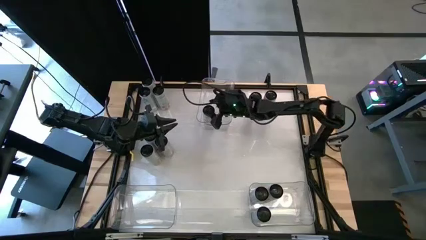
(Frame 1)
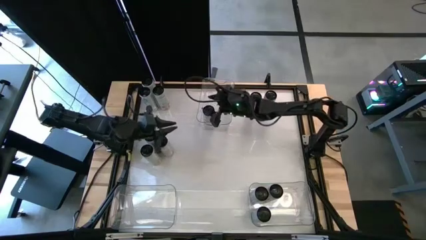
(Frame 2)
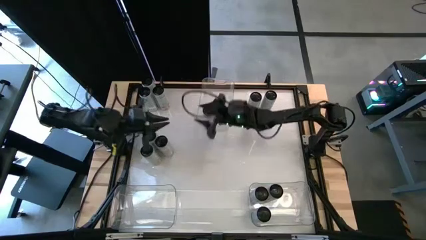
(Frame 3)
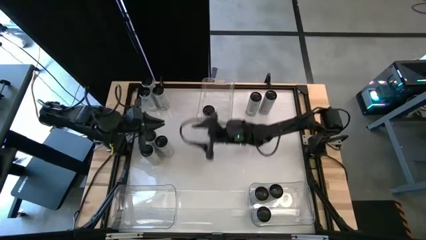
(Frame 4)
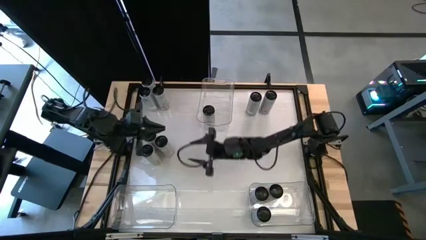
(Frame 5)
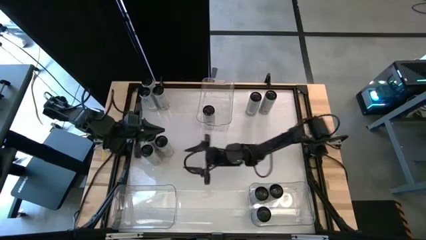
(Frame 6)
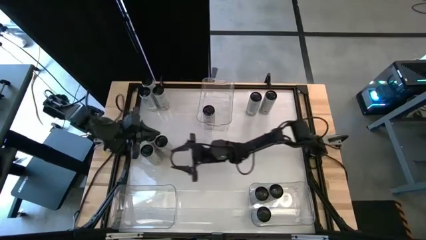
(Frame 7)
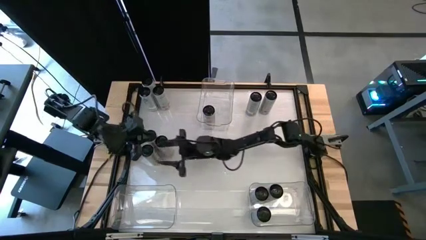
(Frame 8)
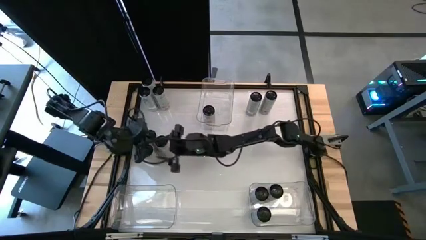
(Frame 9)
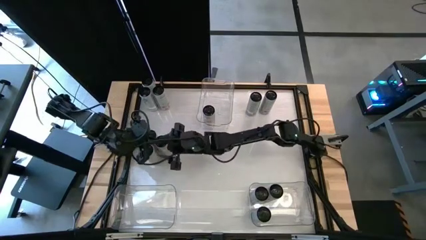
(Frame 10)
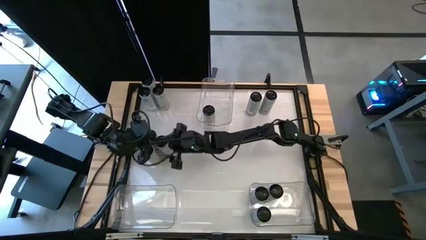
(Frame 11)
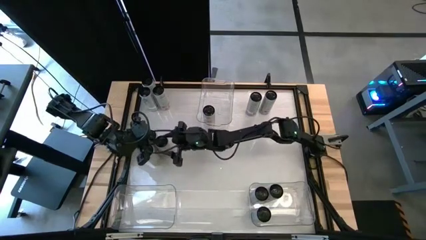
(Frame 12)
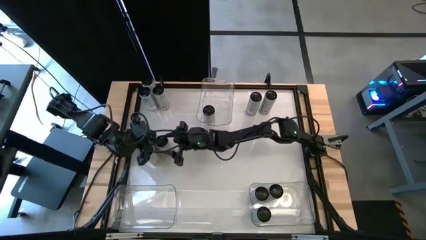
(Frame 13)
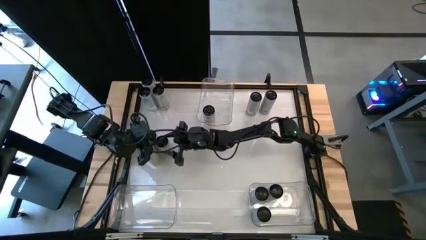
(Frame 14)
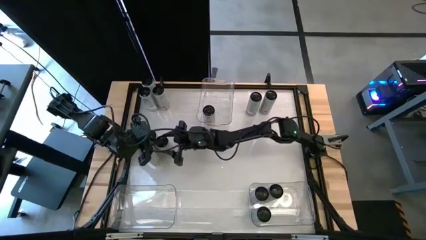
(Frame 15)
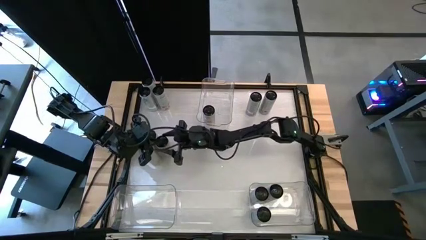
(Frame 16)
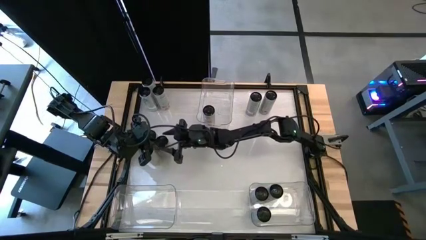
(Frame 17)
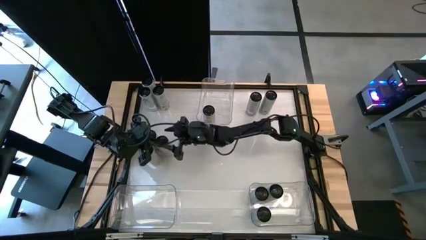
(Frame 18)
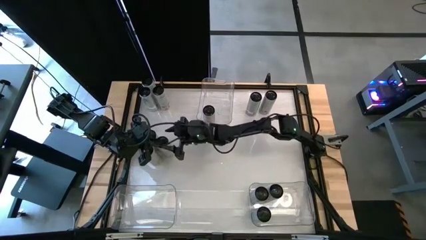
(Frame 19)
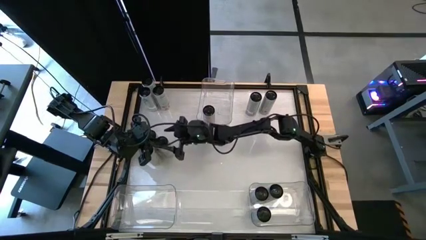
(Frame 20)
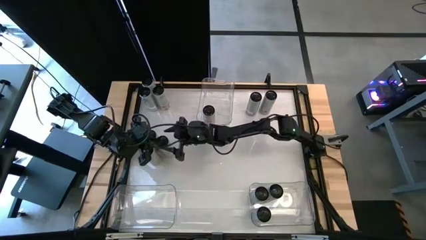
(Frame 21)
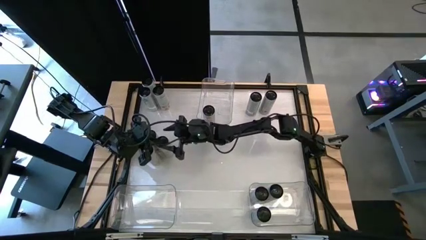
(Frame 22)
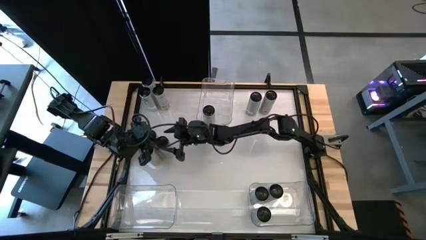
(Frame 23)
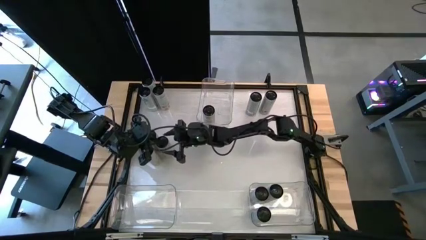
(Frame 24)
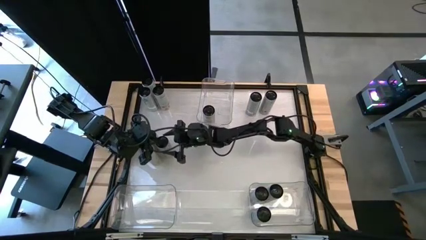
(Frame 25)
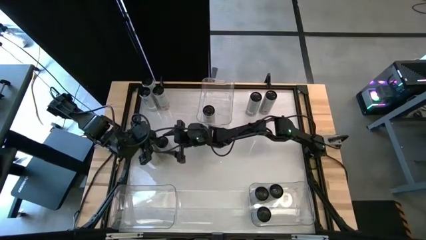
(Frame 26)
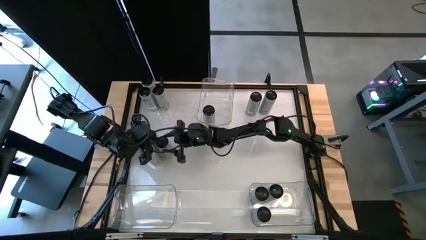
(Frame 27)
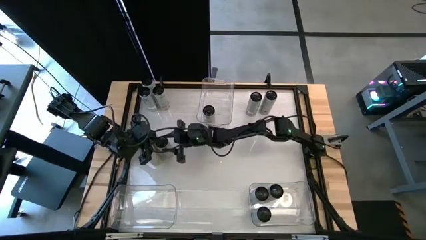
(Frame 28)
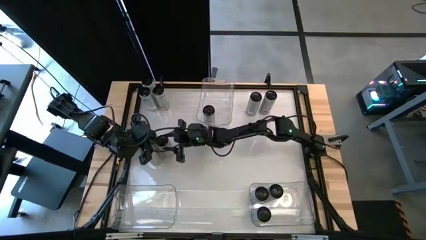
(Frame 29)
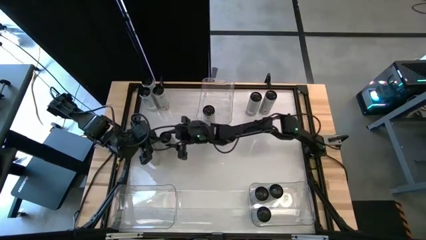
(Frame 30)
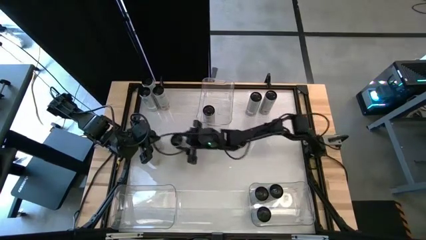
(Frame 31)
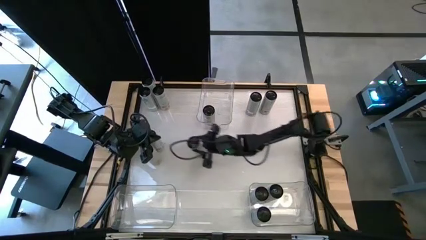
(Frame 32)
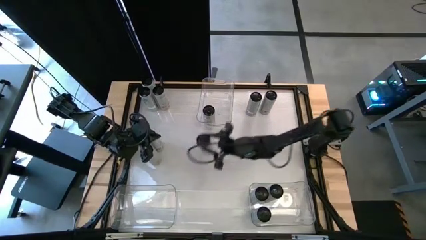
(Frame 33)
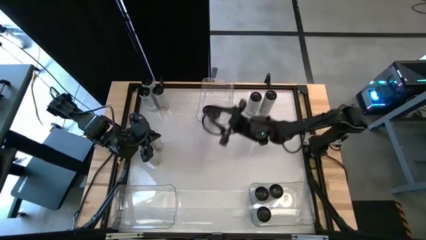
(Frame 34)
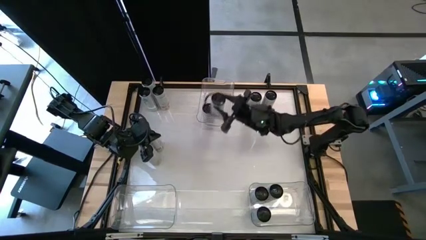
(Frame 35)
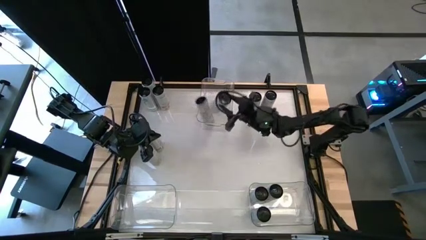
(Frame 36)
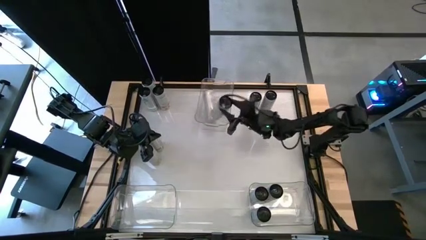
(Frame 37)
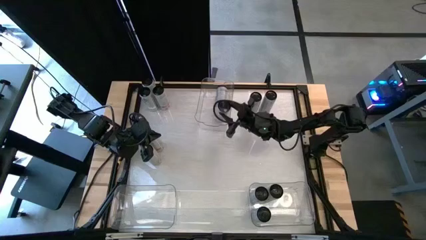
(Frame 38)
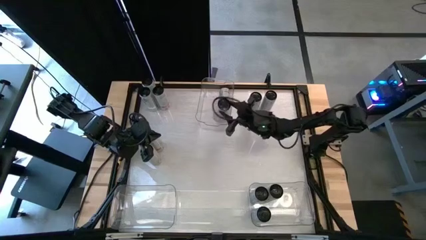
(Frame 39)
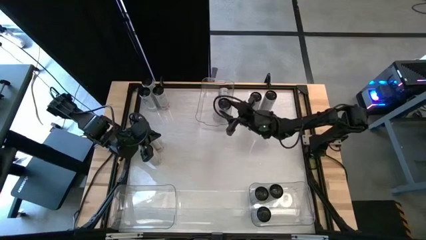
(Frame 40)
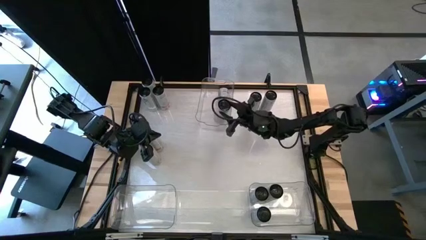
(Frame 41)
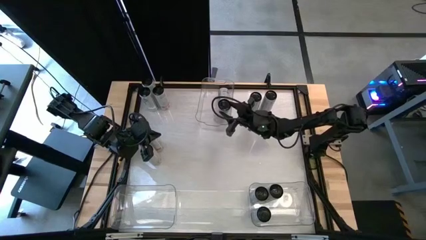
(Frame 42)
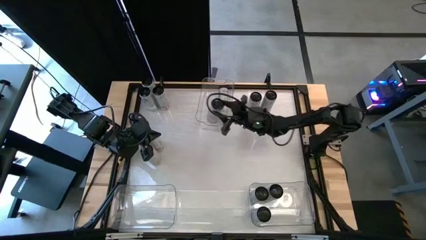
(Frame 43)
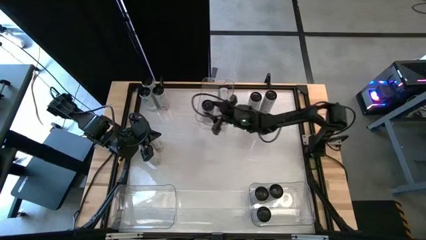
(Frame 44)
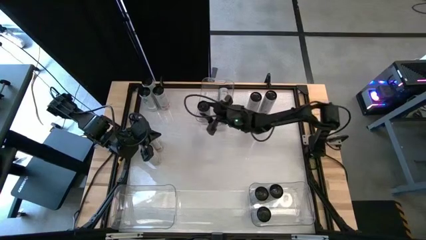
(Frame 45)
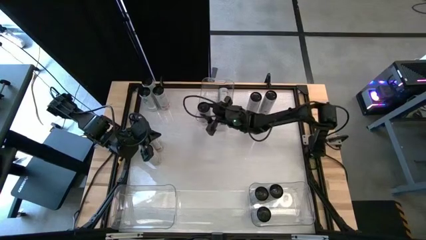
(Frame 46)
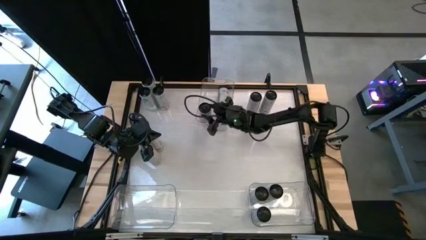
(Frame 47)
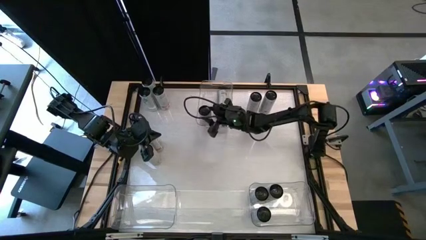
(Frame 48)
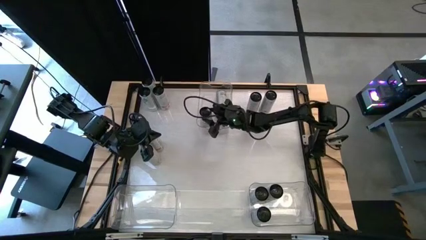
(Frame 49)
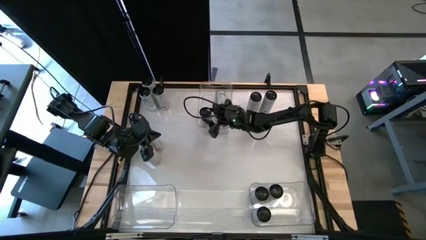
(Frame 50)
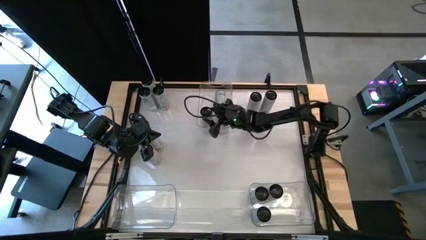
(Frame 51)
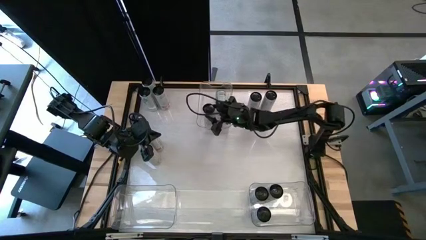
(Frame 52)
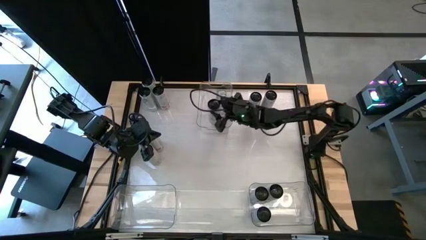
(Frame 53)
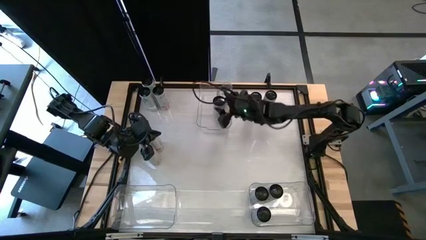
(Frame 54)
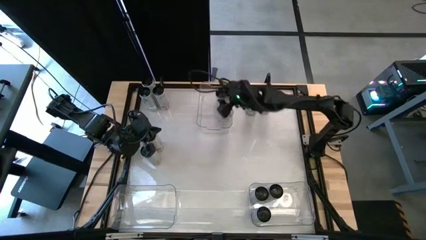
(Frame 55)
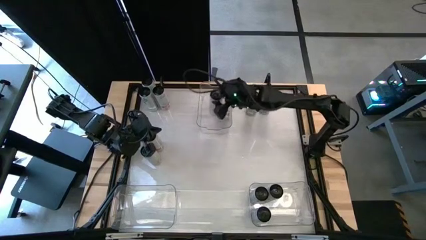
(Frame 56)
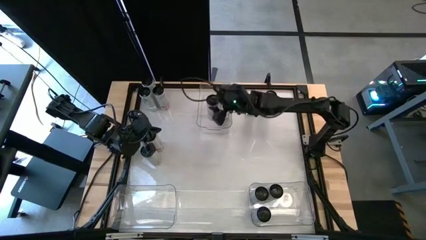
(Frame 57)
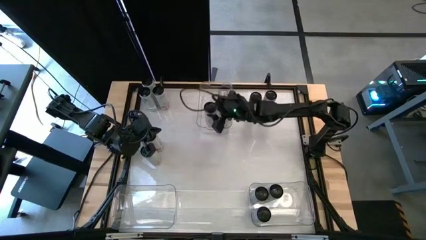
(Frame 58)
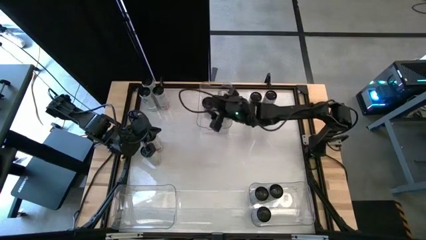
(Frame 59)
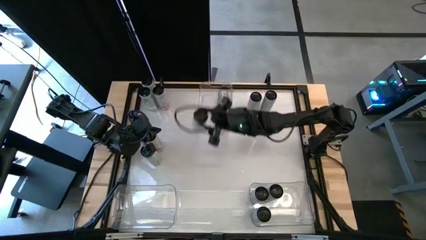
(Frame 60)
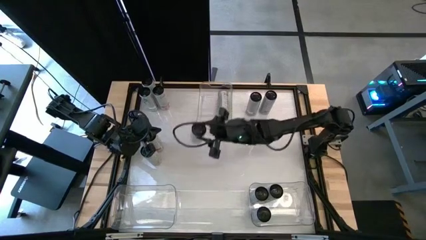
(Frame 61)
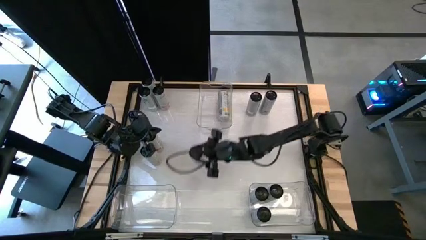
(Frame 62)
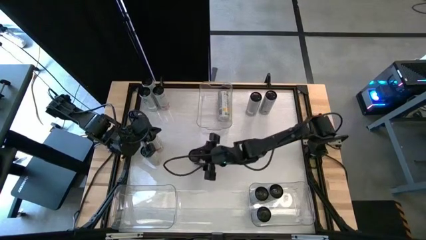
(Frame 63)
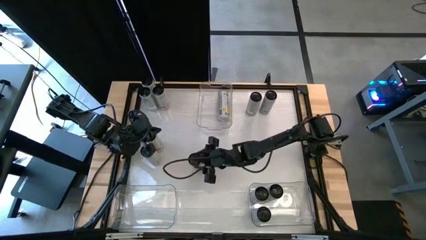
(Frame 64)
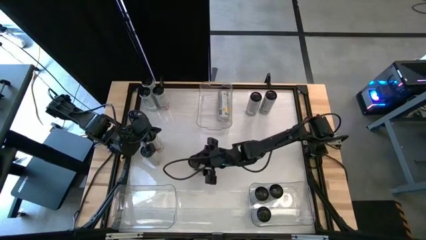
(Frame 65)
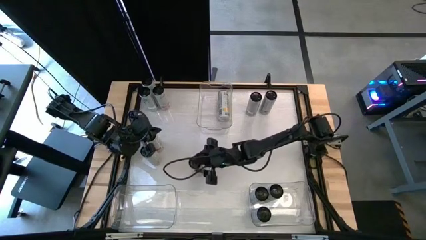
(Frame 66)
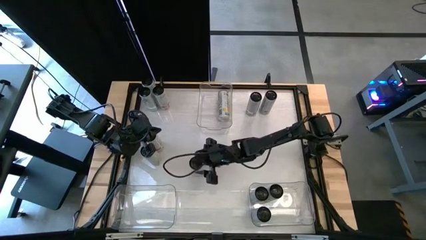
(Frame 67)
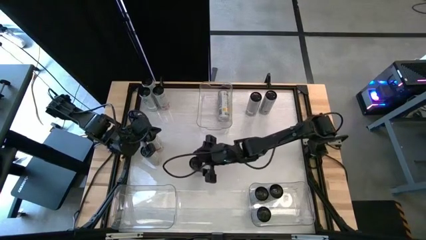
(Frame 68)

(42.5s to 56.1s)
Task: Sort soda cans
Put the right white yellow soda can into the top middle transparent bin
